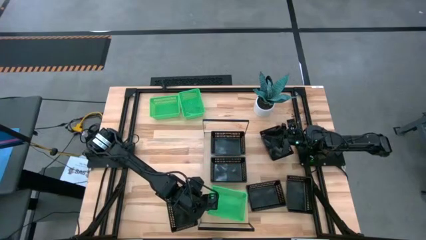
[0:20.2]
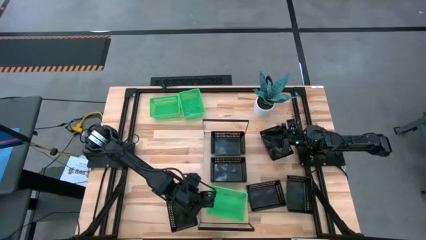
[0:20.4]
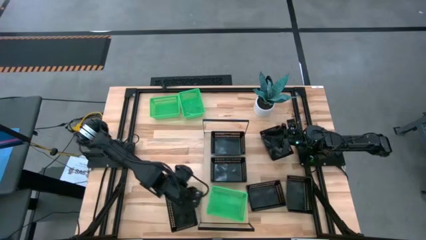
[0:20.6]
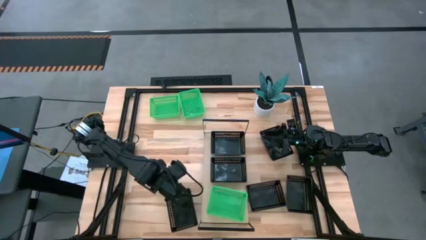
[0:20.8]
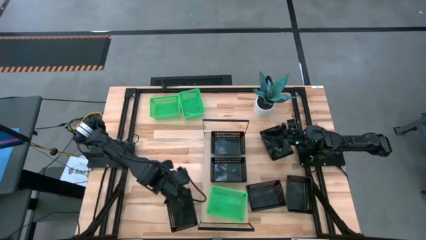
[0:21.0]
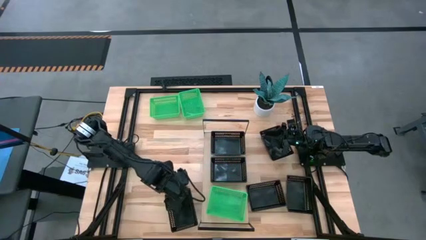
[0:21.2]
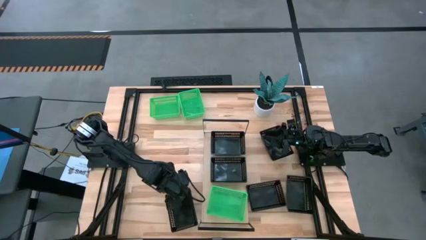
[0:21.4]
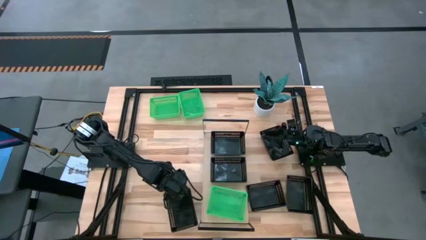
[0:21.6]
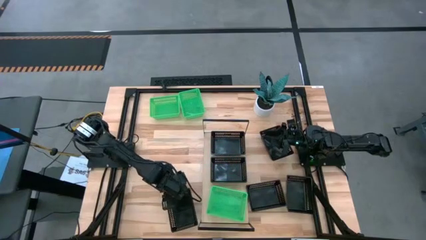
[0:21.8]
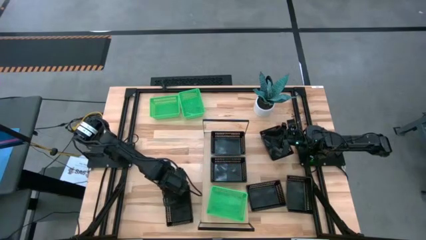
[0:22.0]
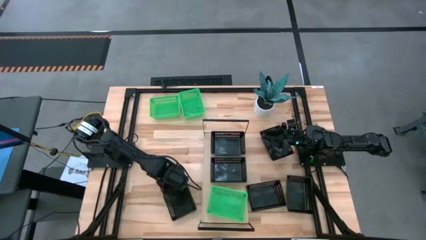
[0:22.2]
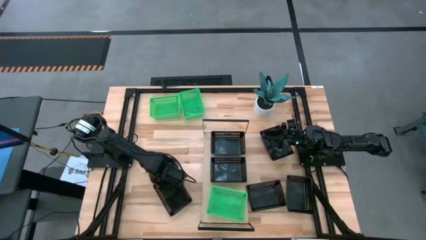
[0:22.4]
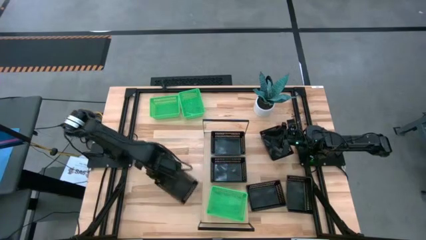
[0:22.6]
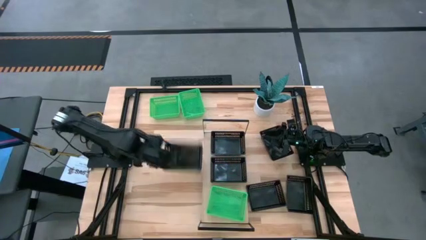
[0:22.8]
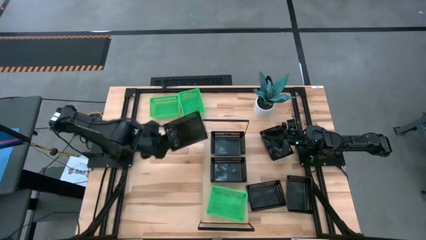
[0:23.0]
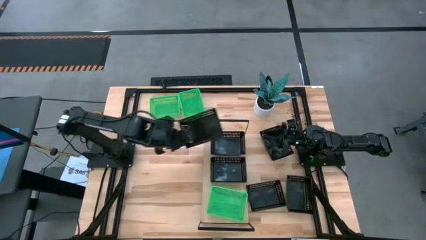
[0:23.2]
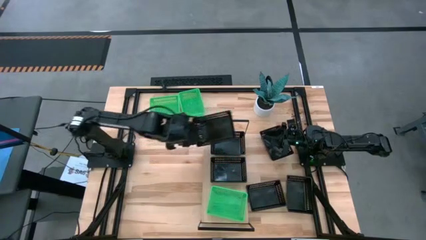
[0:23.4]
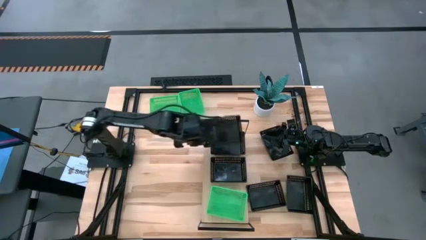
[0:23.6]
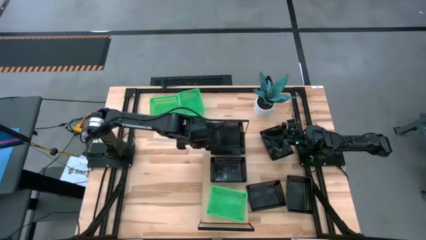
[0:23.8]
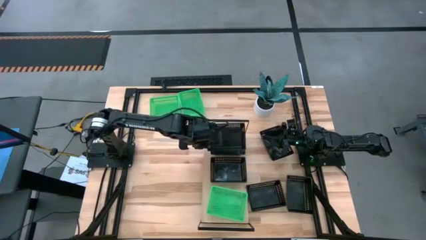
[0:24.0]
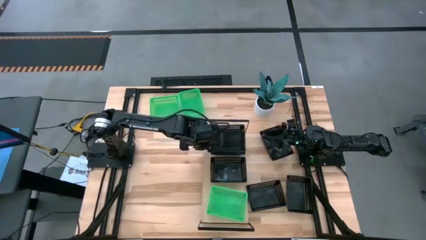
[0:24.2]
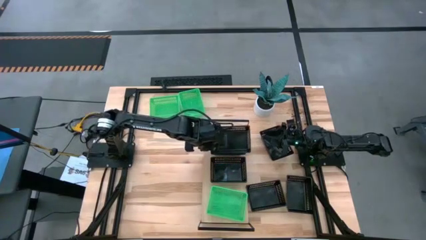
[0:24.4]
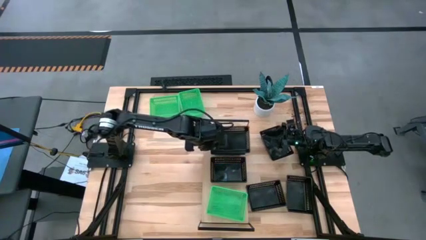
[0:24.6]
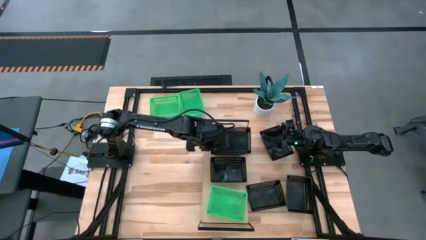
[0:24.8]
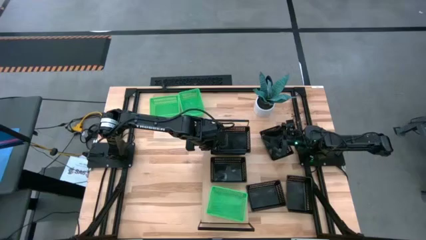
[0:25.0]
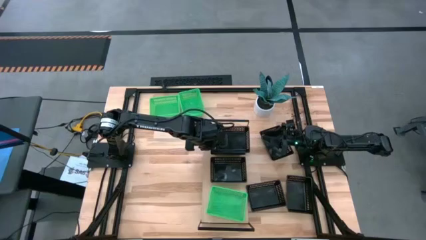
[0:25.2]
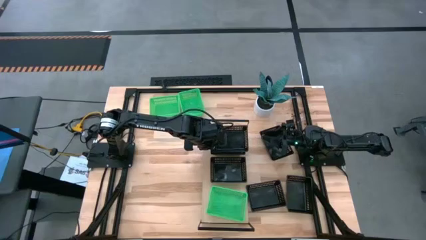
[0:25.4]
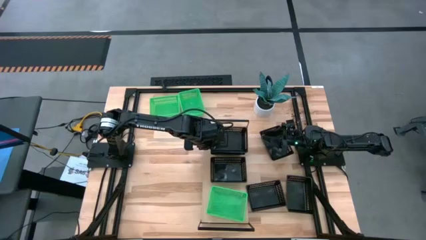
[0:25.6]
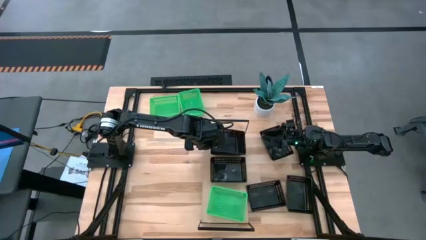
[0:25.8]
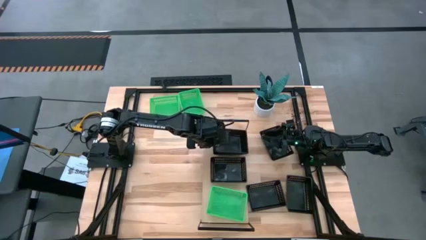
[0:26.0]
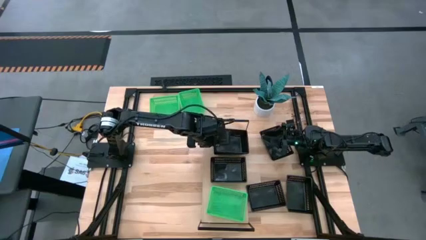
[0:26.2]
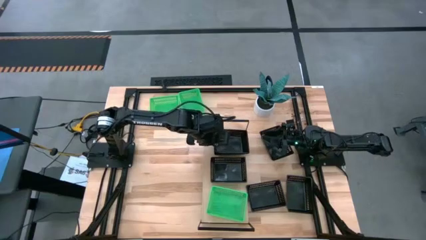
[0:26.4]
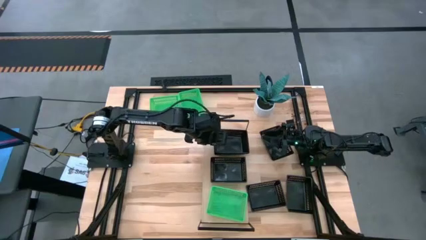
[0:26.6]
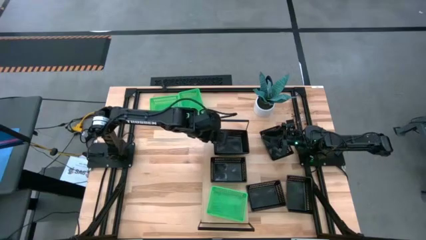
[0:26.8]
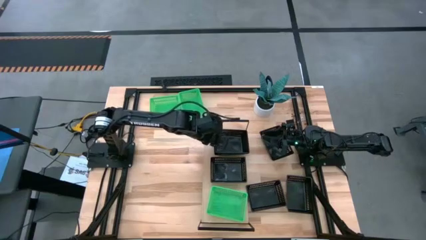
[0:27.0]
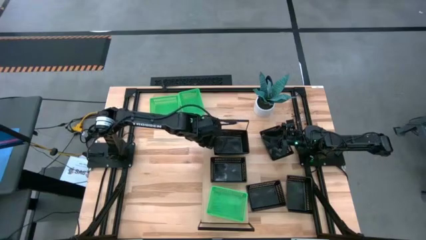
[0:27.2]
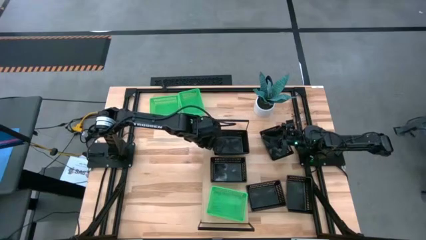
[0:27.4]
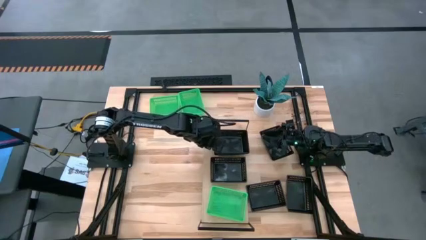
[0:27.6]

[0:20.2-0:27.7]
Task: Stack baskets on shelf by color
Stack the black bin on top of the black bin on the shelf

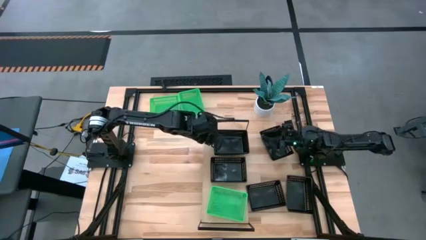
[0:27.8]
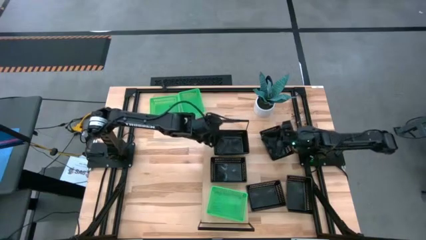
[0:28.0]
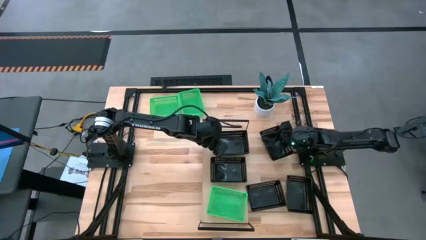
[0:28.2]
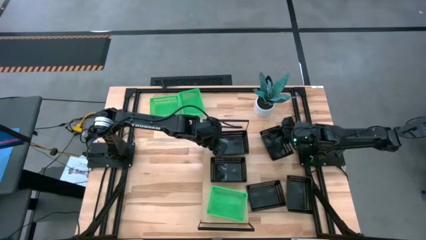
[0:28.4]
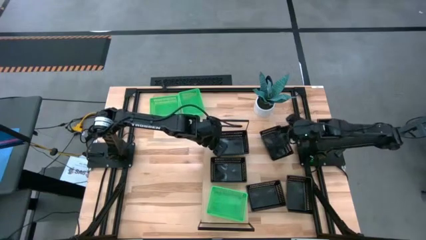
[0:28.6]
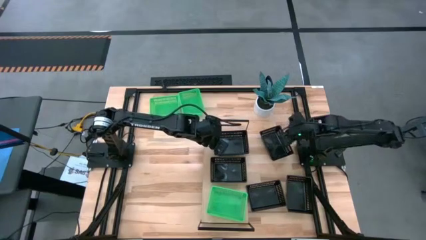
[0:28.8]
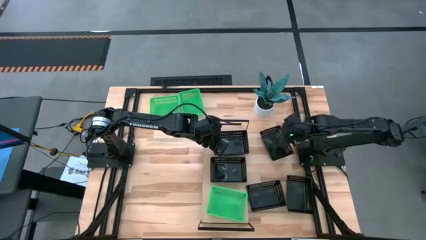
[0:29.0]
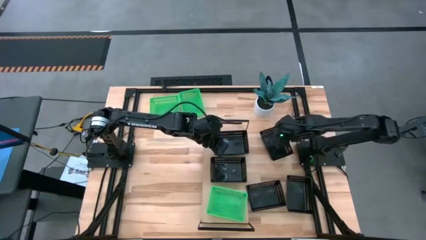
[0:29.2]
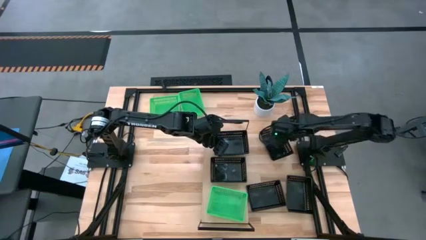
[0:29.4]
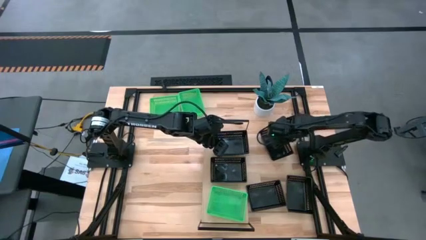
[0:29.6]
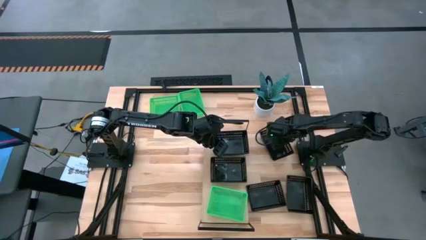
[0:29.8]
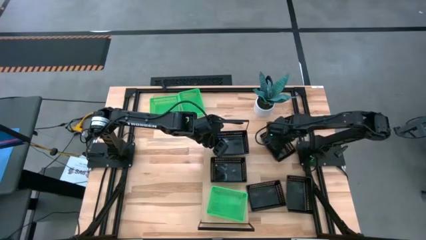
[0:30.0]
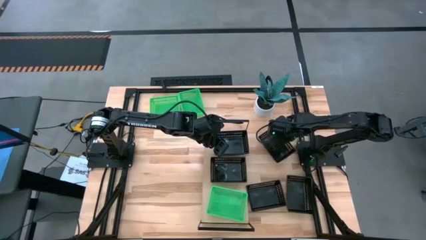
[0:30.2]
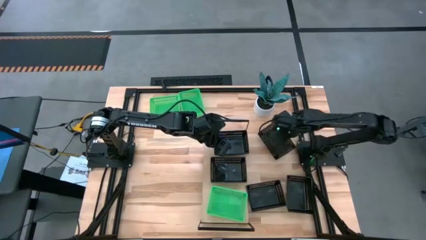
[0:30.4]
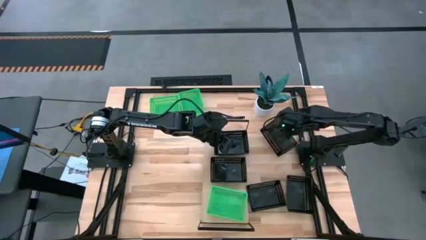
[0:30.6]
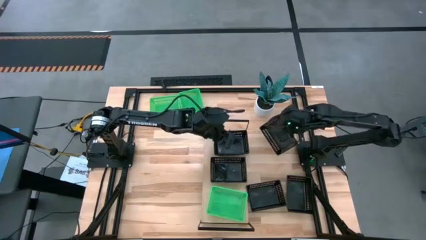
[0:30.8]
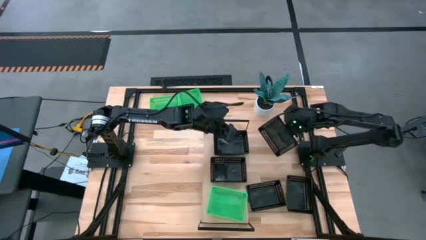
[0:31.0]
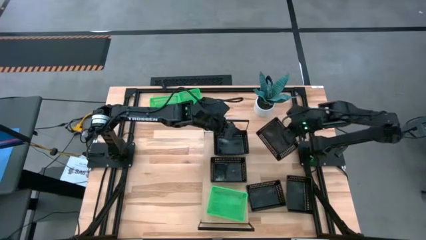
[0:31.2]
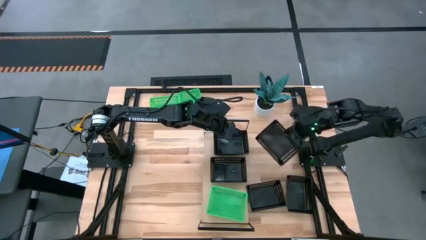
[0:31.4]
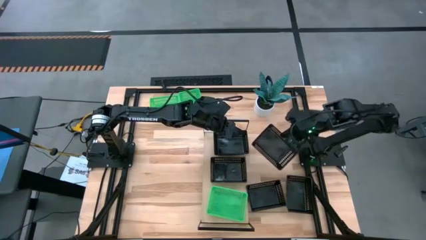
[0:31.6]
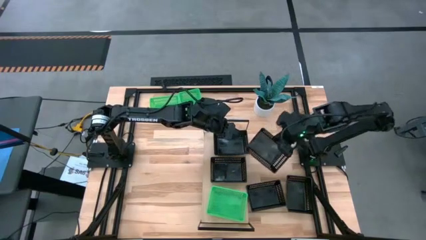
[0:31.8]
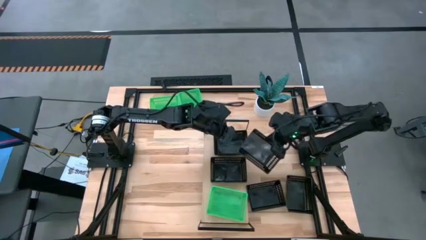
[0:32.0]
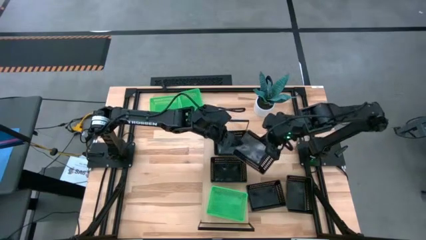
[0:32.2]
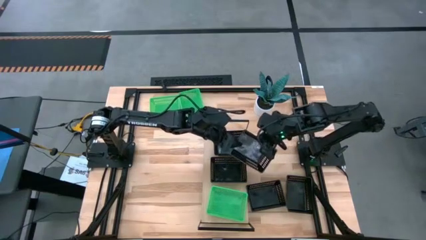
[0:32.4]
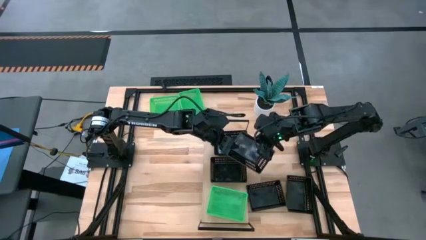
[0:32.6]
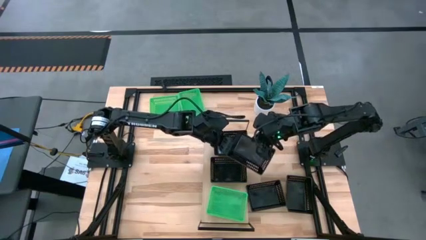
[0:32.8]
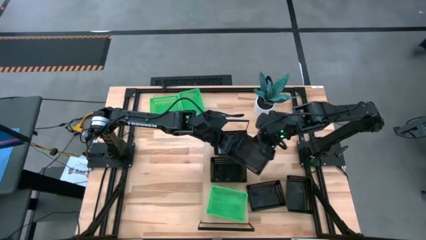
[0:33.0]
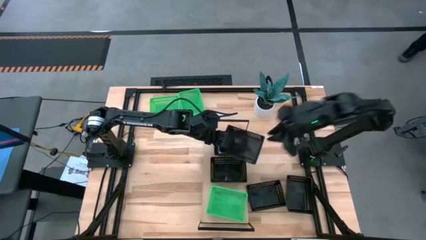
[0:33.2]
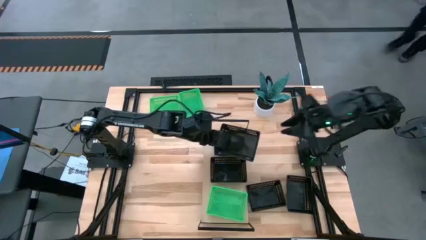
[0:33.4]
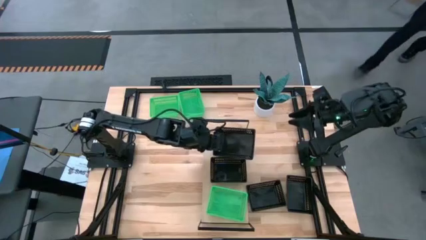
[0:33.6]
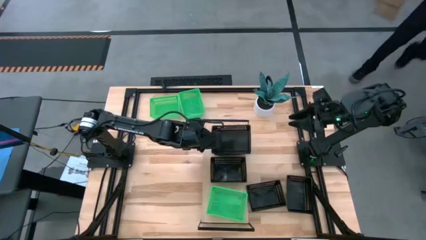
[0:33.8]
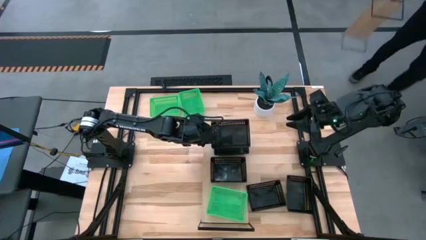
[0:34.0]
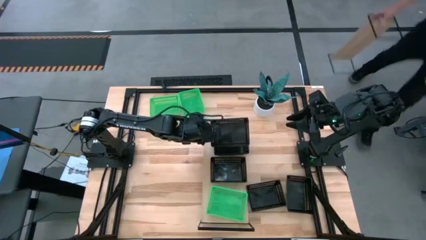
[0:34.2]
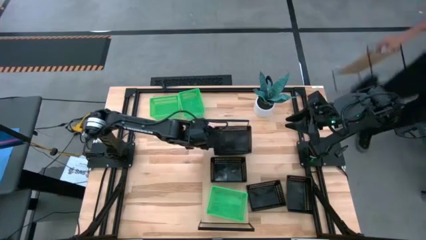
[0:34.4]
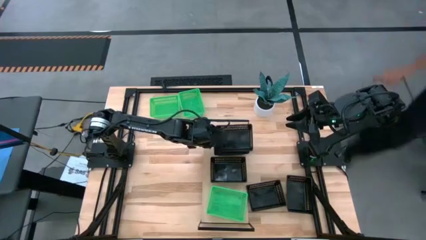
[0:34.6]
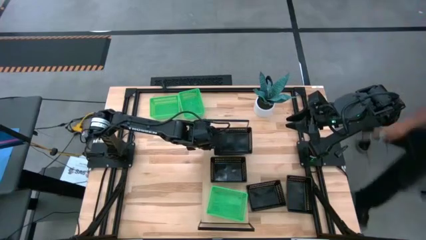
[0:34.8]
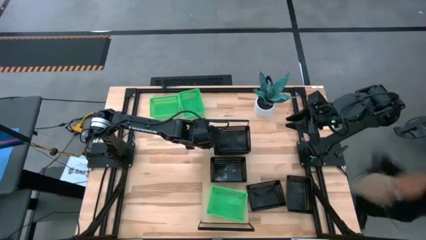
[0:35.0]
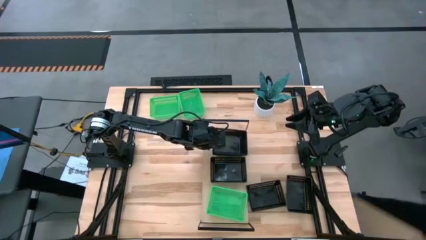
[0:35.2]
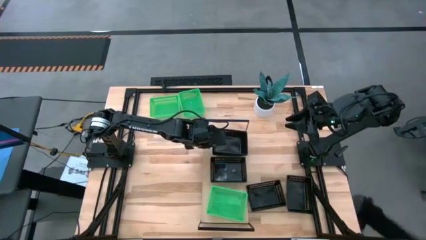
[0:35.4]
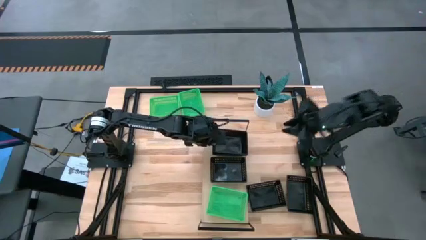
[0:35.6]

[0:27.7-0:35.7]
Stack the black bin on top of the black bins on the shelf

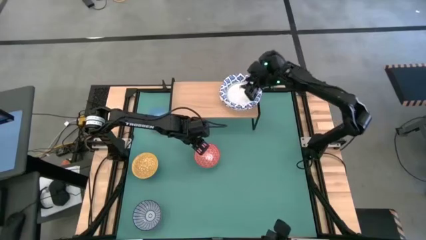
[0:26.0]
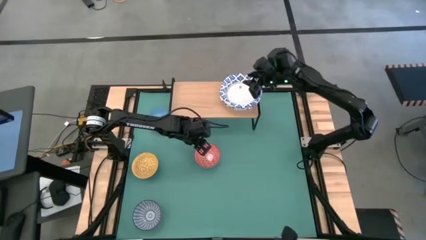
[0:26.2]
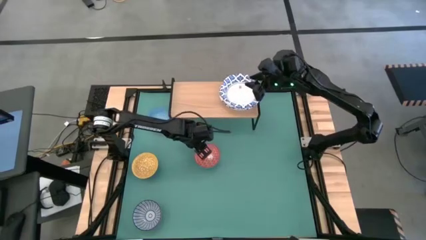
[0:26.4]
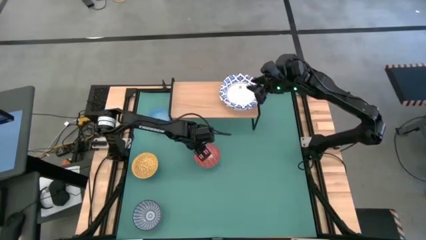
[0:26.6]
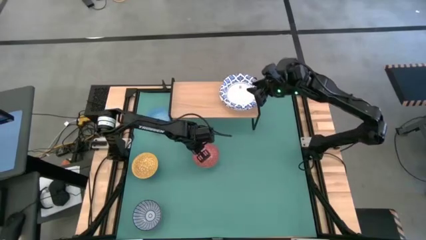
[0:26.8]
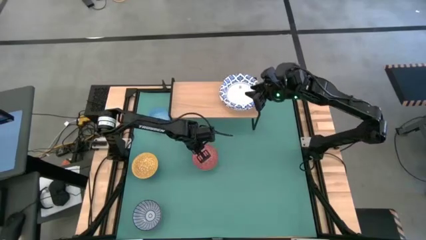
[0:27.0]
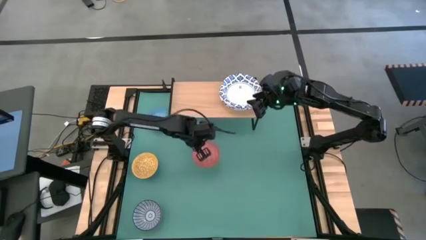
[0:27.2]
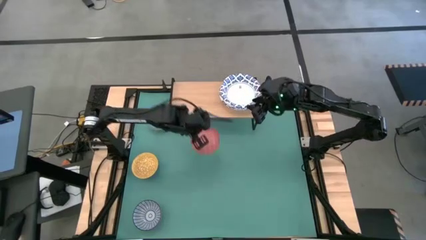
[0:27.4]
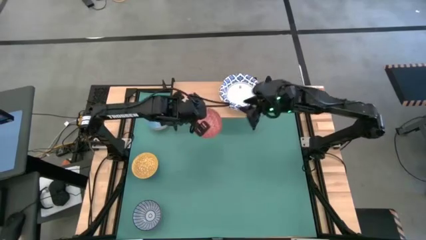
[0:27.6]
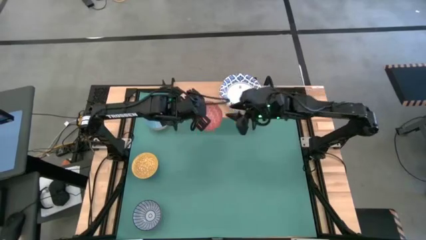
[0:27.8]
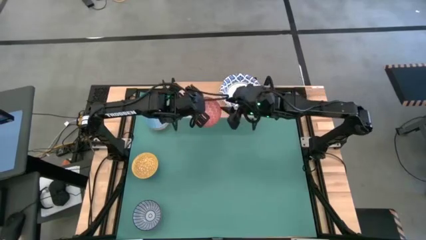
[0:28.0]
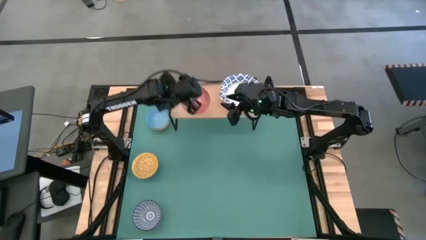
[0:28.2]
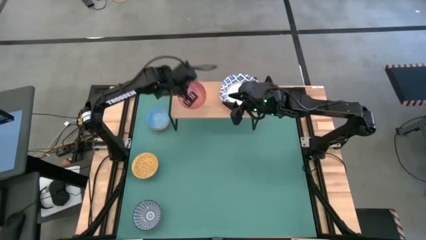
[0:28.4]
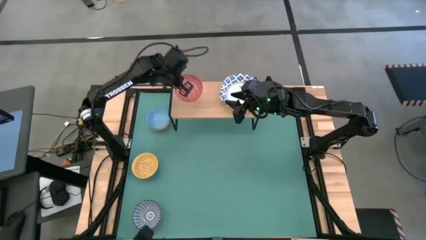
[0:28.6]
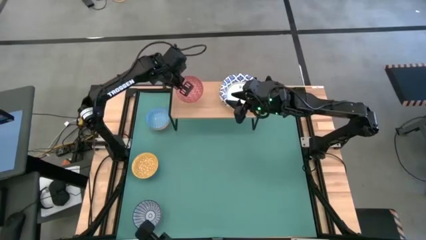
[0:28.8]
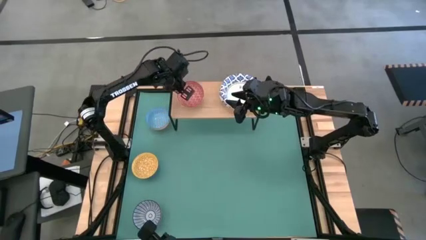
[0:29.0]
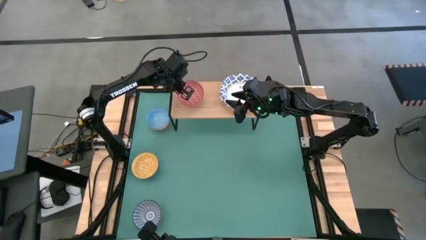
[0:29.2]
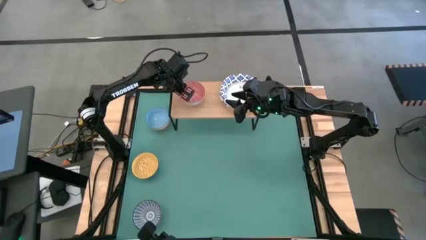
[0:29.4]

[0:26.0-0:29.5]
Task: Place and stack bowls onto a shelf
Put the red patterned bowl on the shelf
